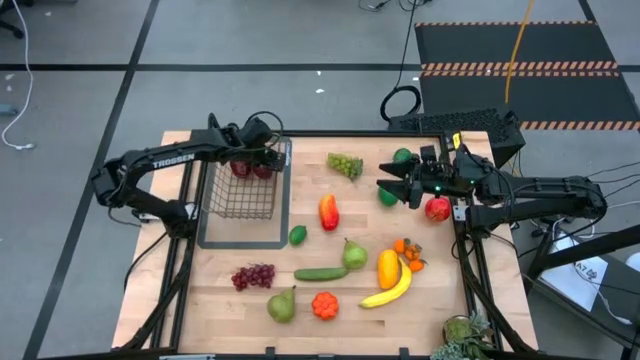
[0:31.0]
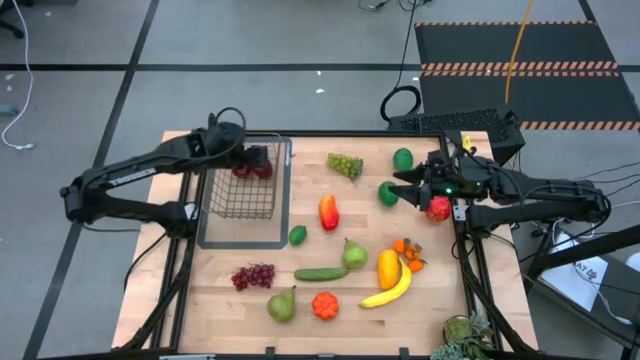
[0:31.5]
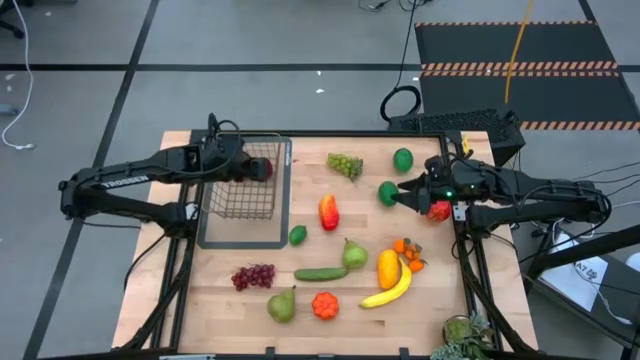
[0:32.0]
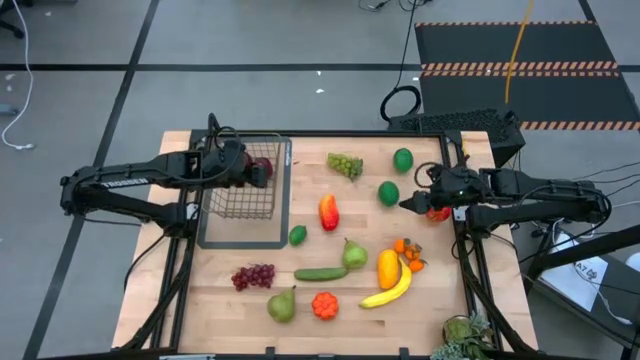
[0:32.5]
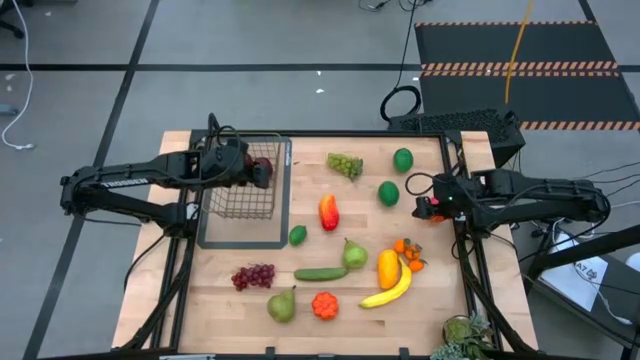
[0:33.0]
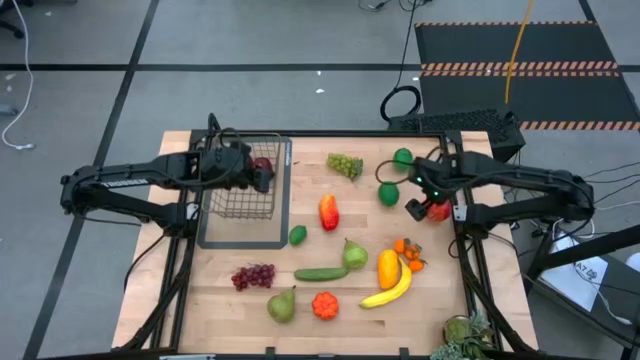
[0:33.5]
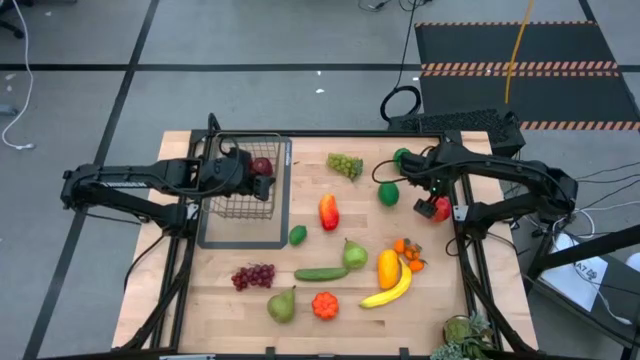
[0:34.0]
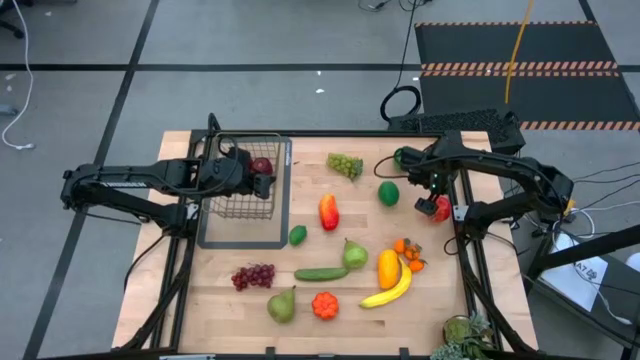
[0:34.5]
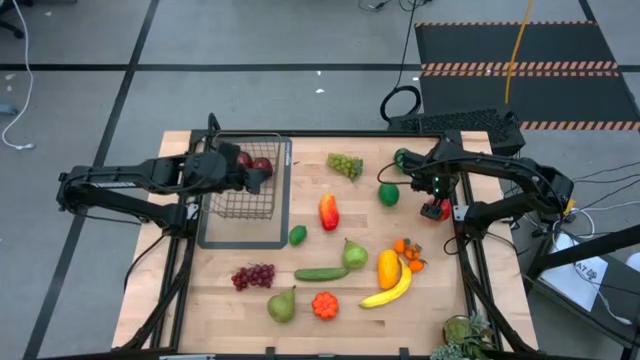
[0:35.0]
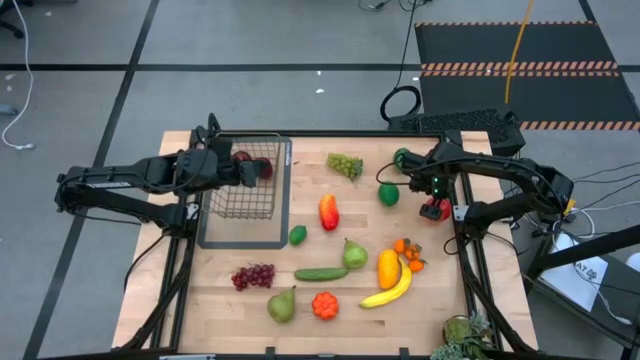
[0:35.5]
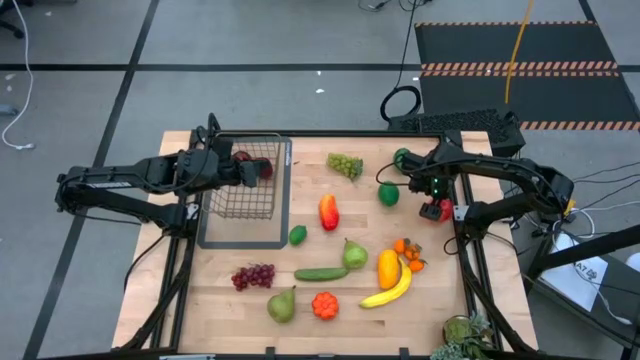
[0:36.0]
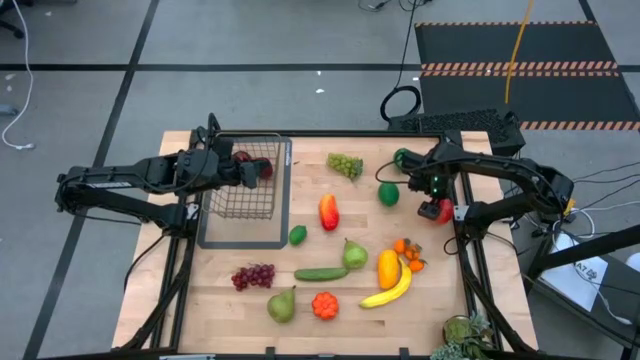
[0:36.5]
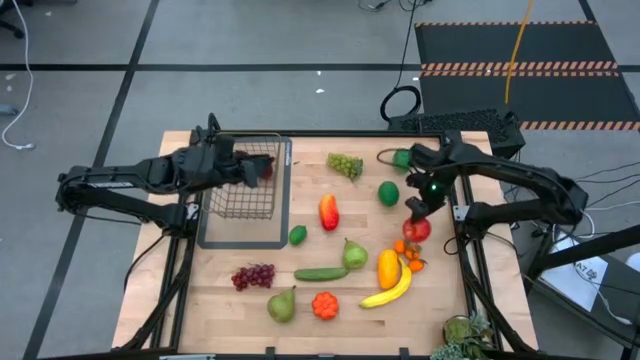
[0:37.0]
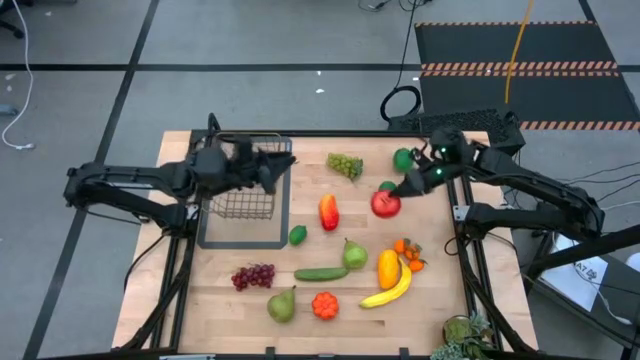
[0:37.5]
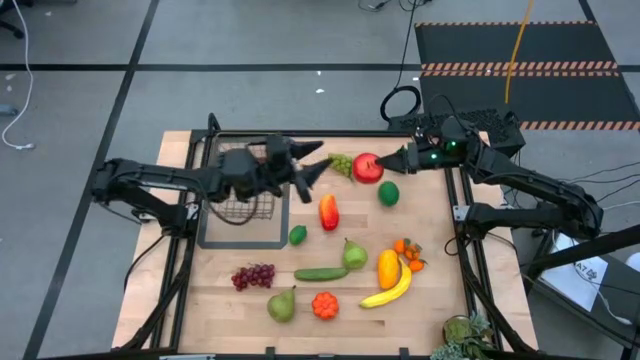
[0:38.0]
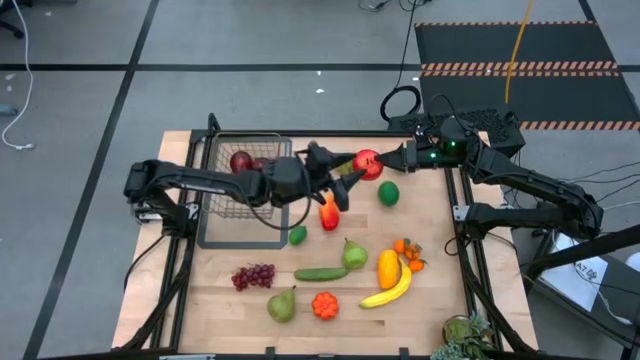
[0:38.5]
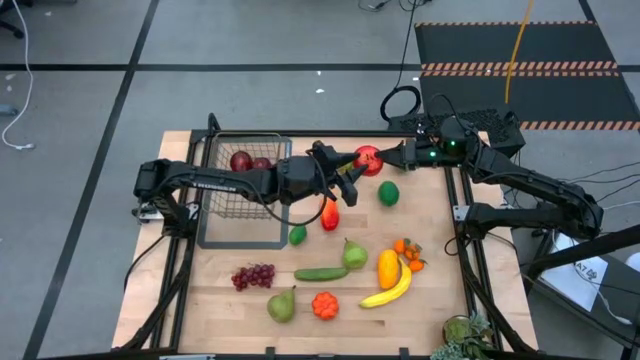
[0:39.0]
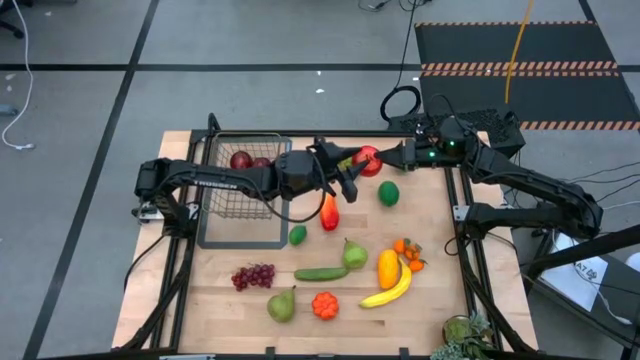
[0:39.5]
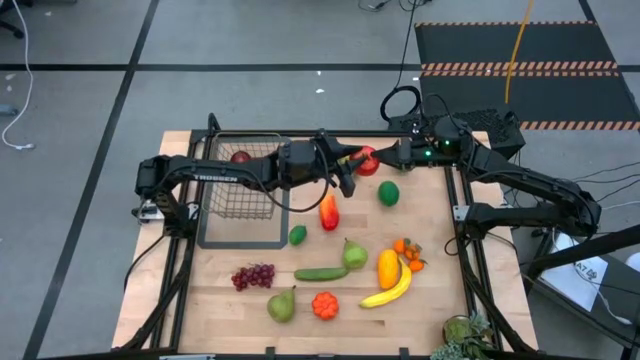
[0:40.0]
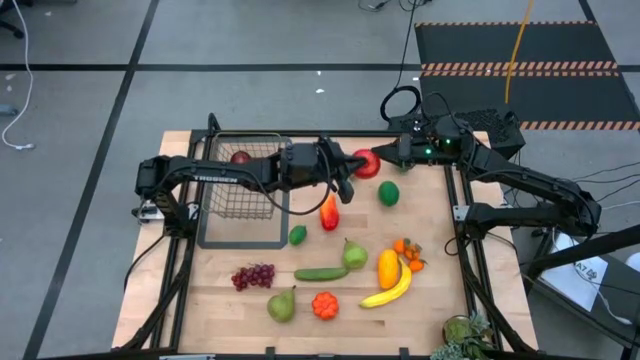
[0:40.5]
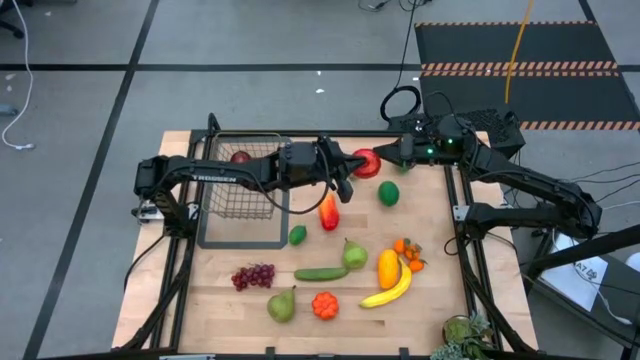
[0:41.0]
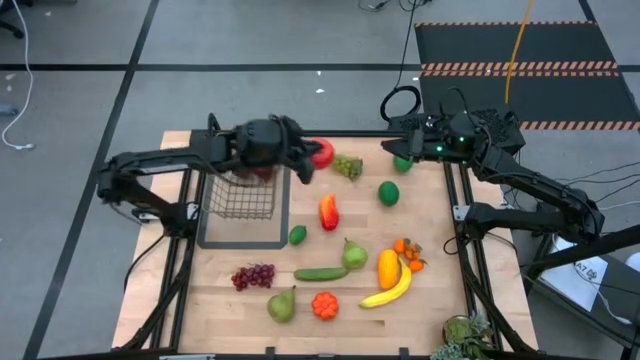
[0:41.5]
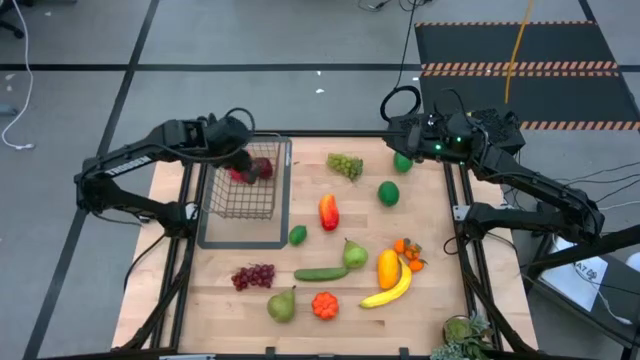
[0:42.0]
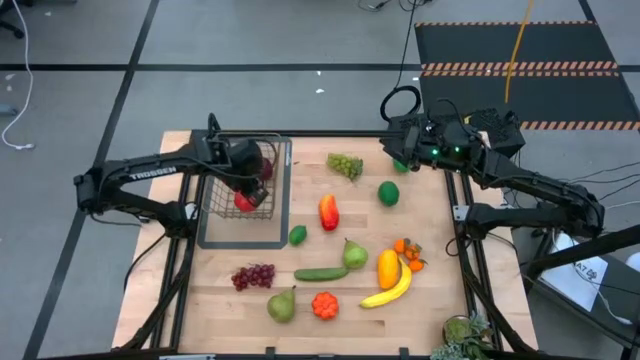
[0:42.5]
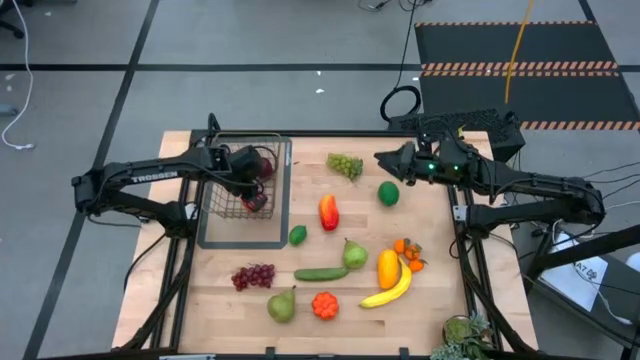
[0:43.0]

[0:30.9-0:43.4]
Task: Build produce basket
Put the red apple into the wire basket

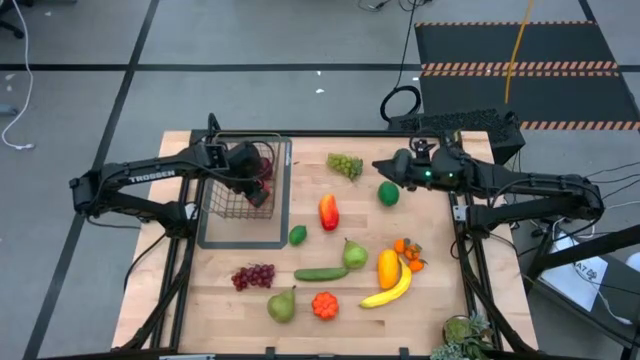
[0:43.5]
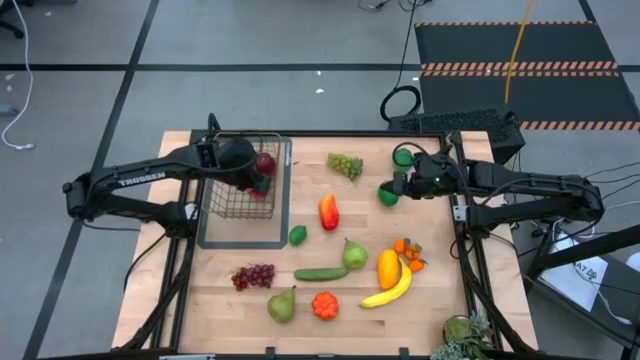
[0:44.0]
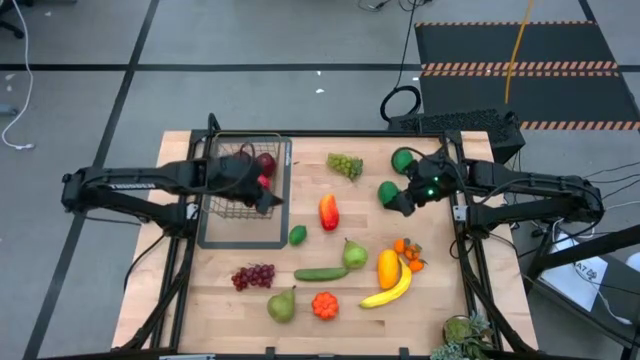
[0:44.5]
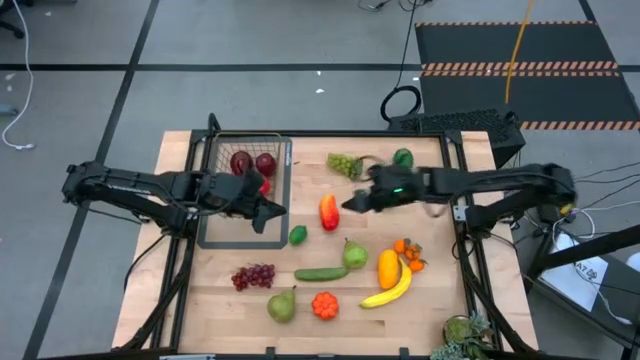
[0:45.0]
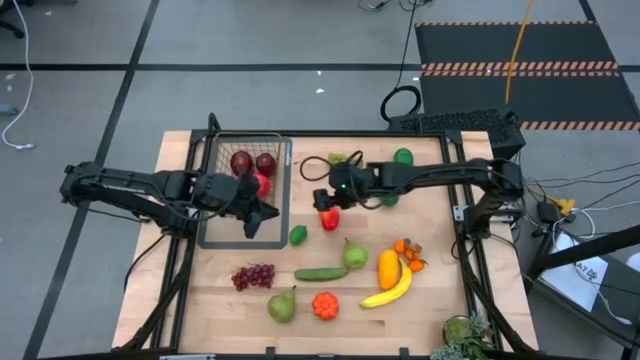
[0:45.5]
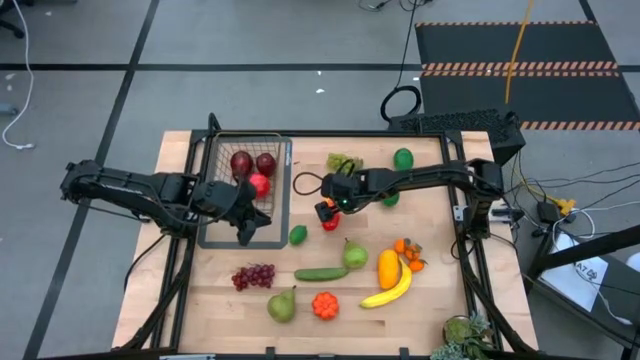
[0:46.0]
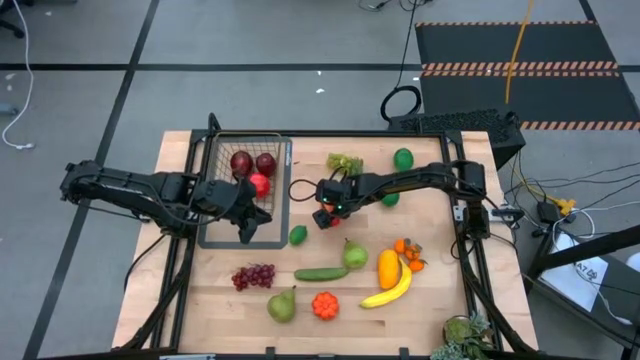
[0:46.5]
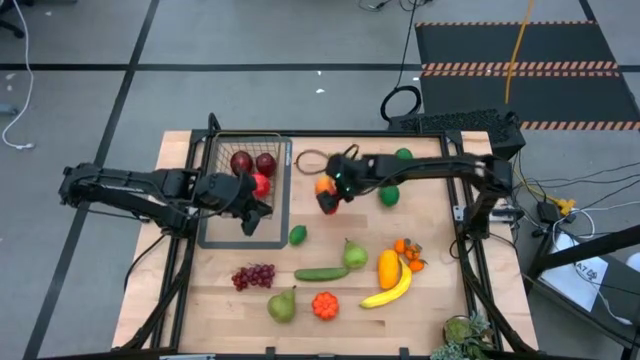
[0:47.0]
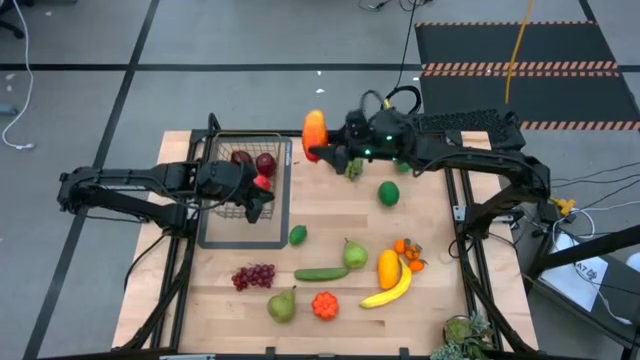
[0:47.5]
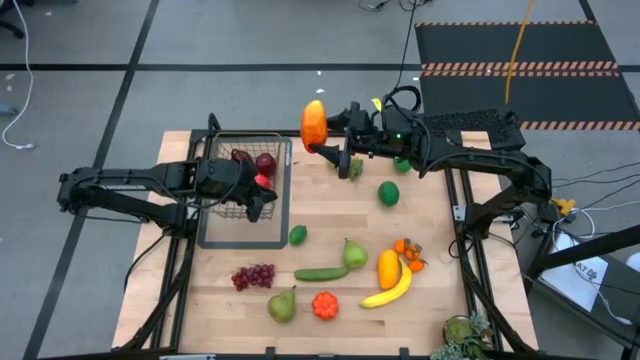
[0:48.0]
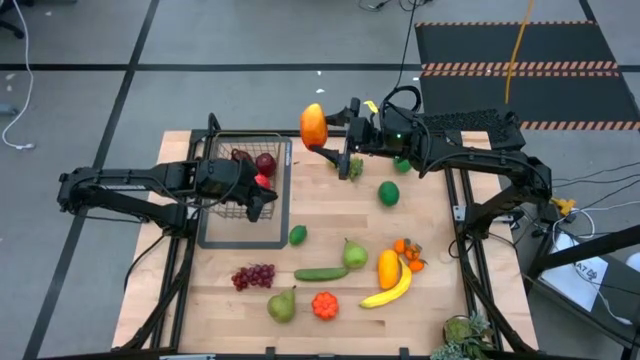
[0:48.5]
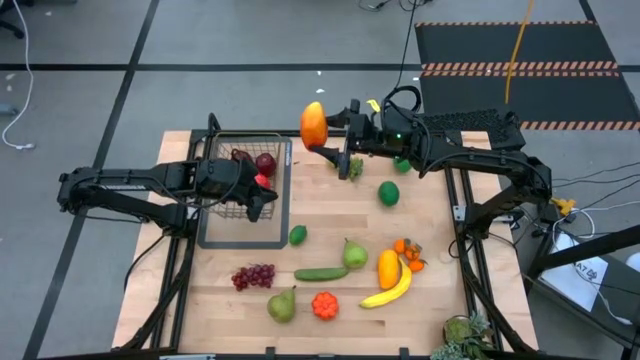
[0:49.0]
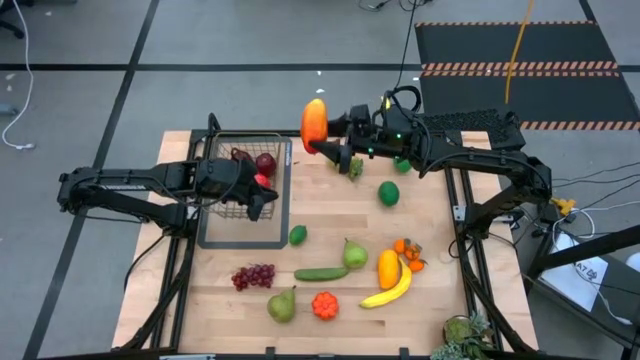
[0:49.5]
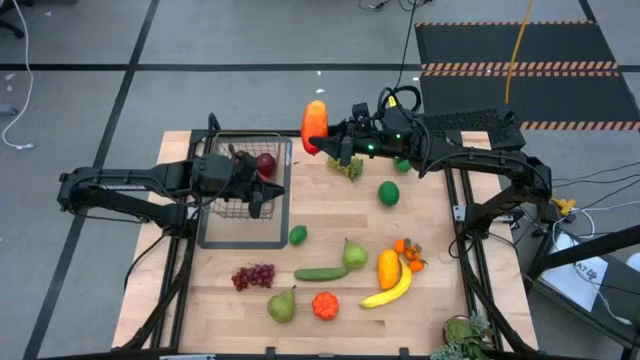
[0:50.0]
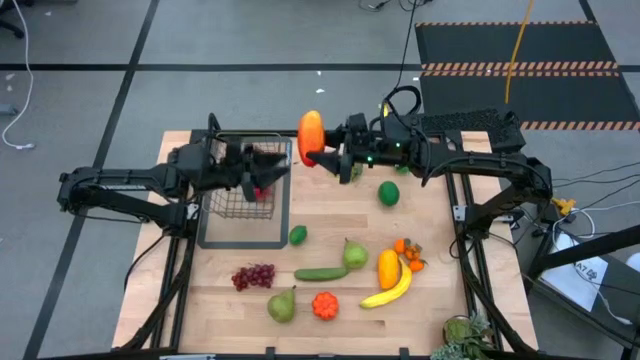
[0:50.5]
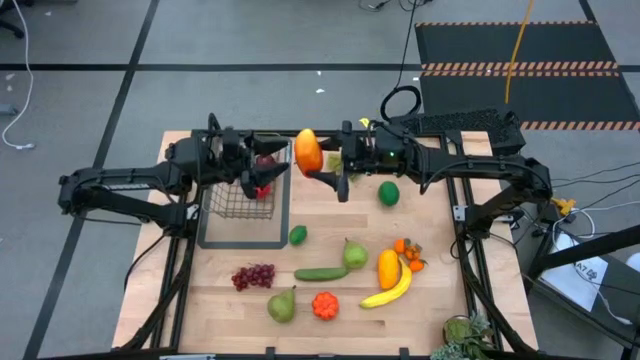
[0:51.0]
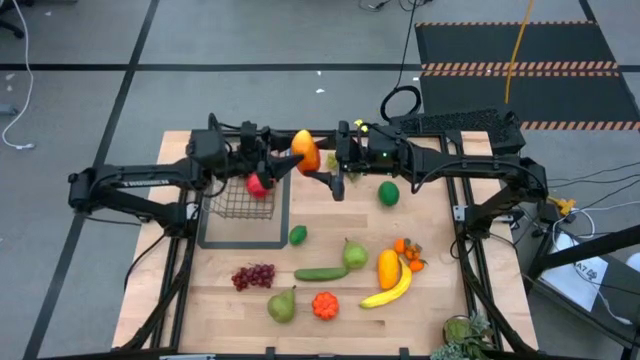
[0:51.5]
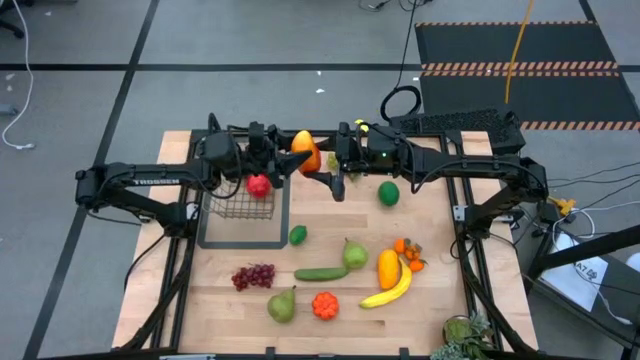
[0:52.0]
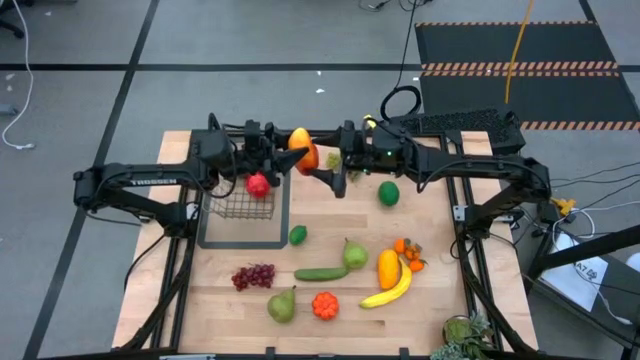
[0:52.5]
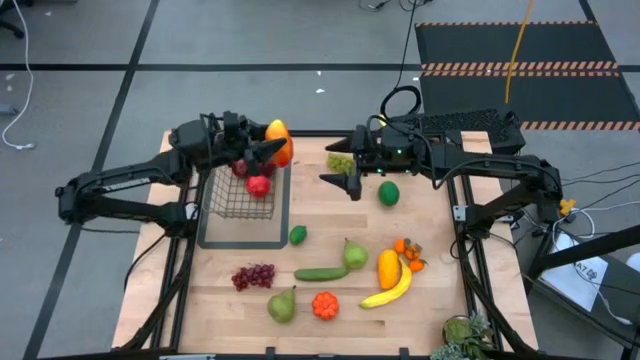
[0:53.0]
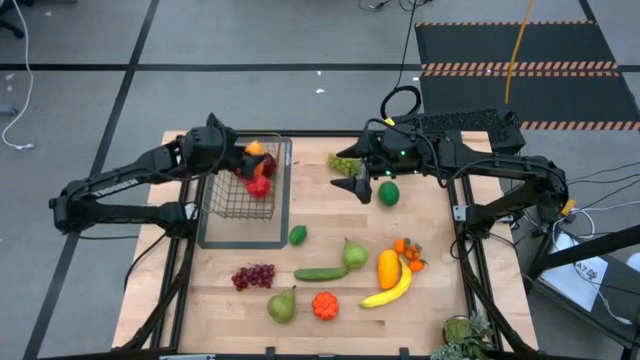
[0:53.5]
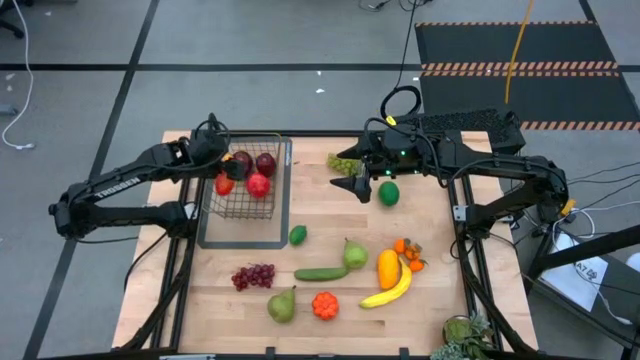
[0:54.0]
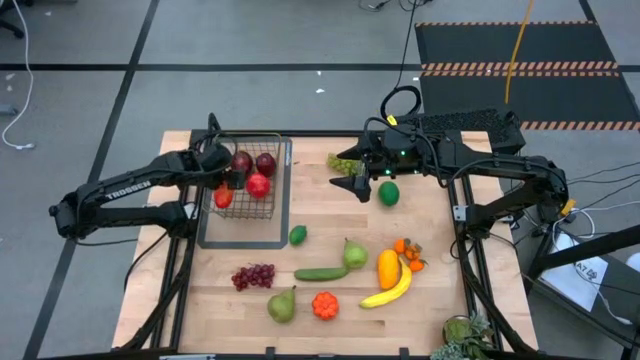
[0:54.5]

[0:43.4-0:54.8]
Put the top mango into the wire basket
